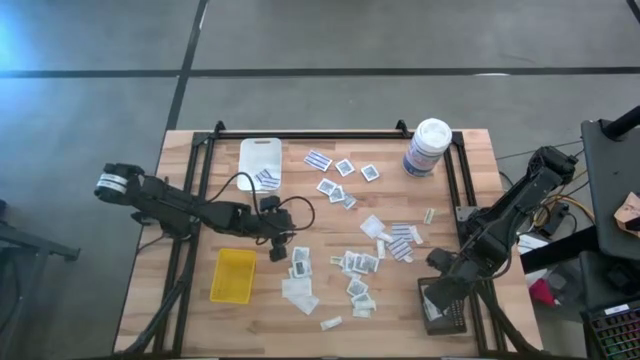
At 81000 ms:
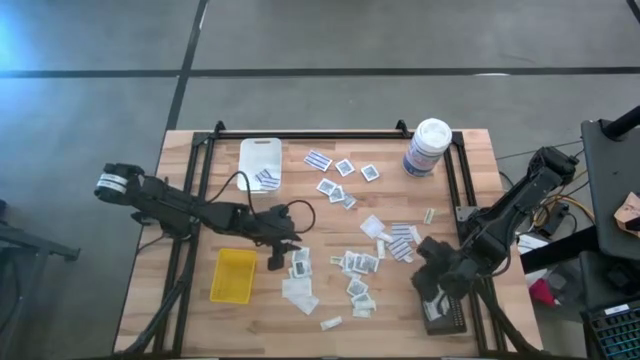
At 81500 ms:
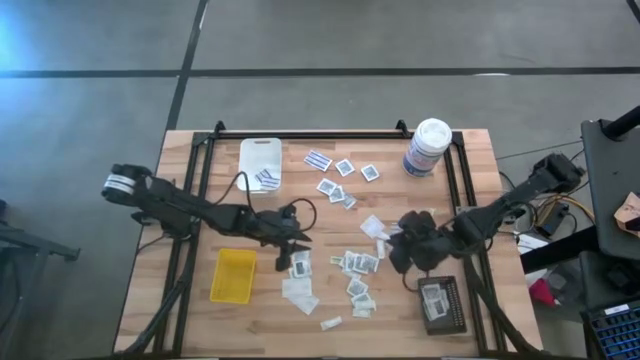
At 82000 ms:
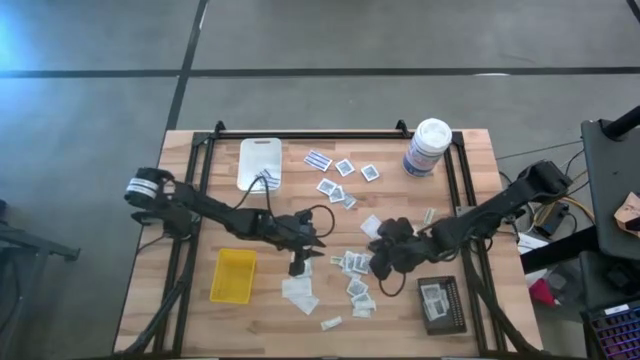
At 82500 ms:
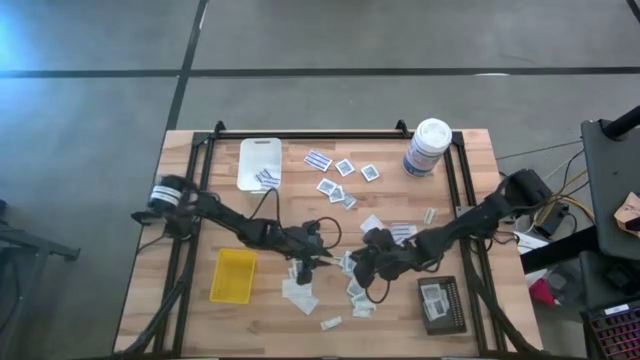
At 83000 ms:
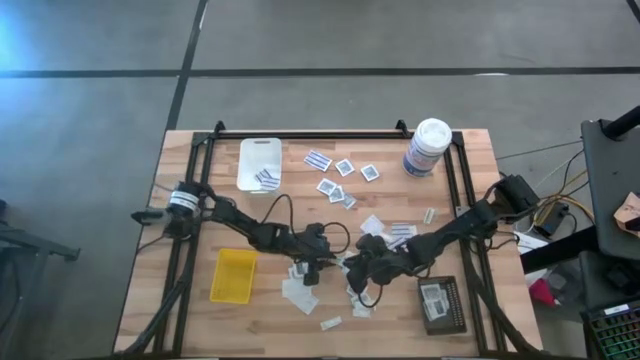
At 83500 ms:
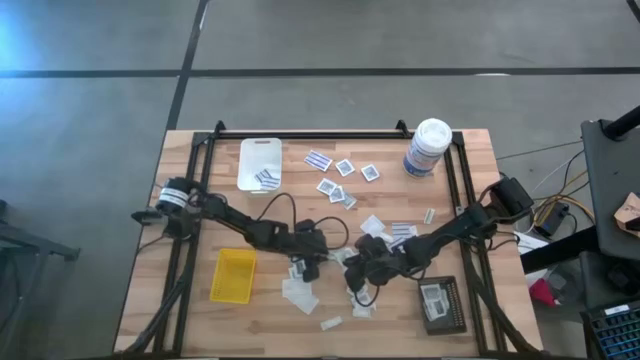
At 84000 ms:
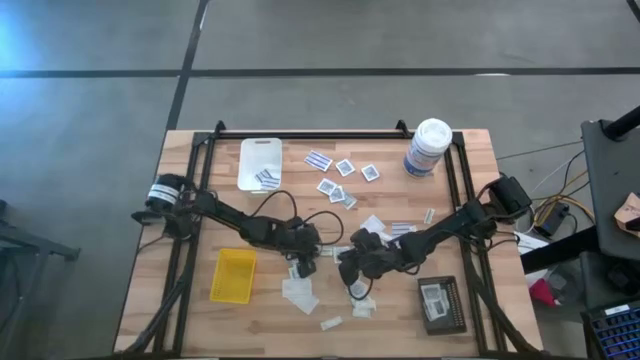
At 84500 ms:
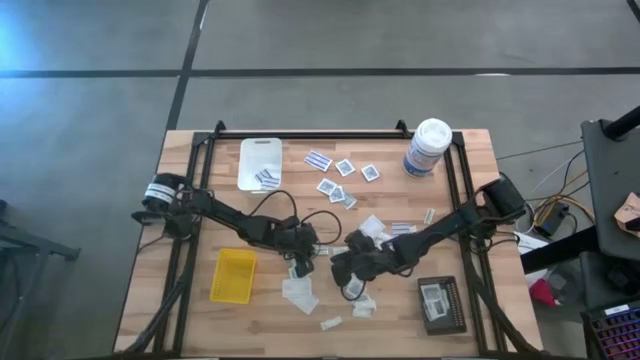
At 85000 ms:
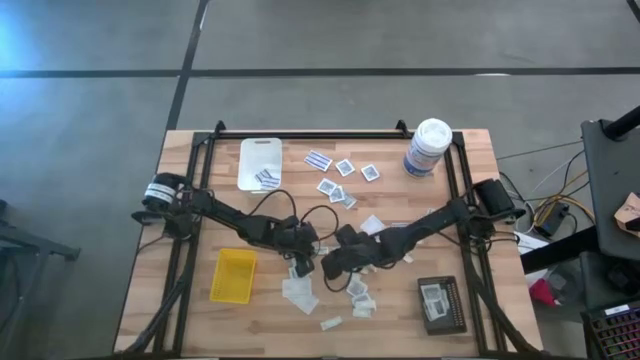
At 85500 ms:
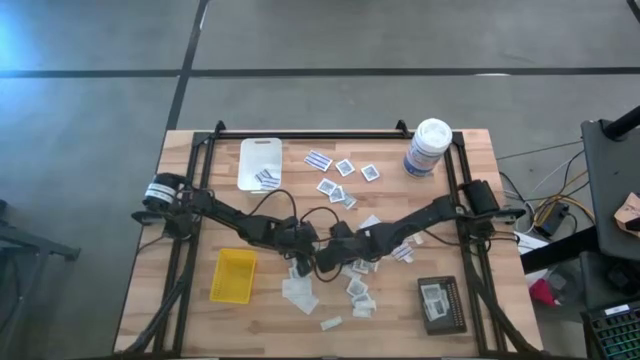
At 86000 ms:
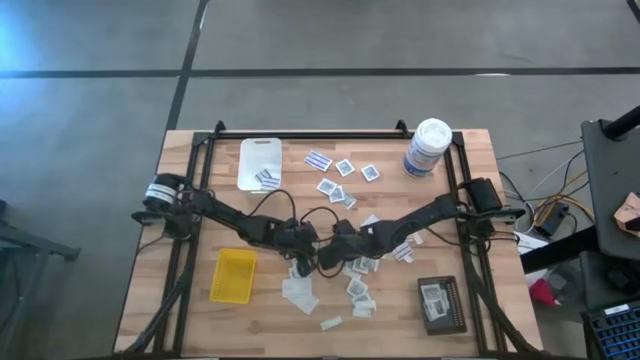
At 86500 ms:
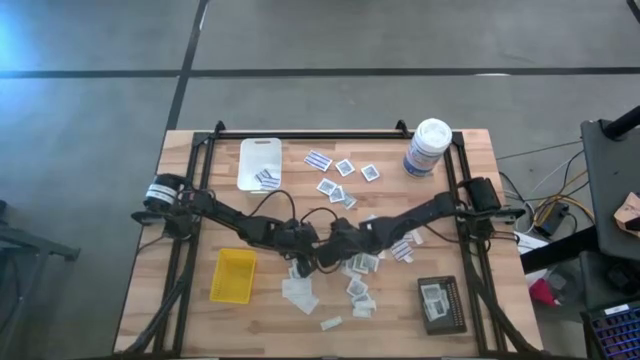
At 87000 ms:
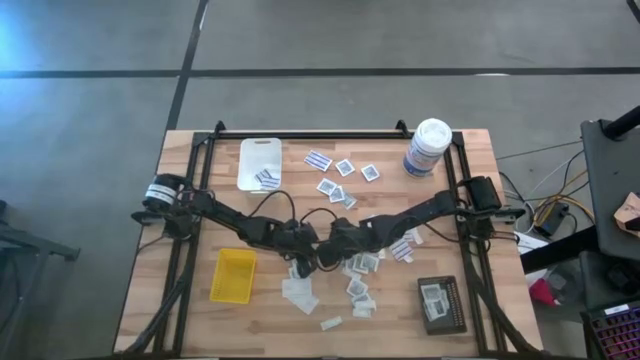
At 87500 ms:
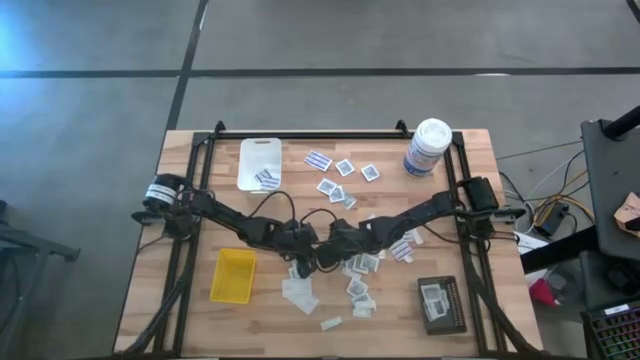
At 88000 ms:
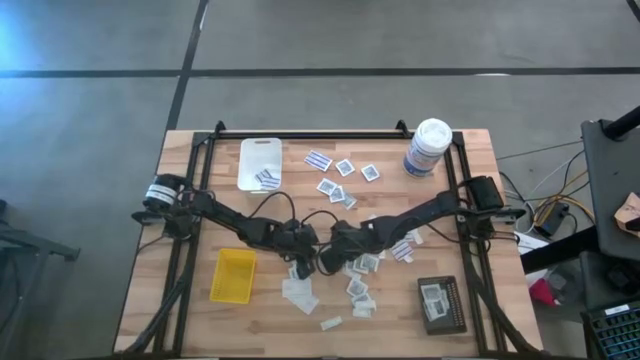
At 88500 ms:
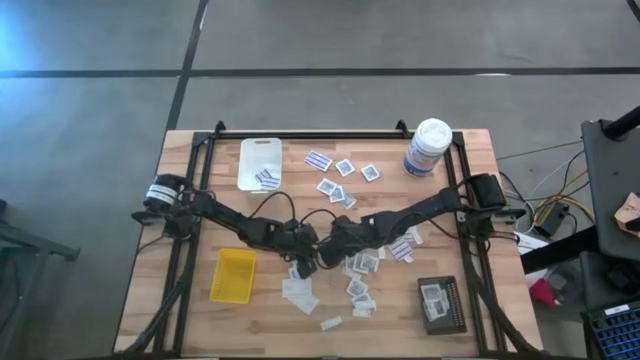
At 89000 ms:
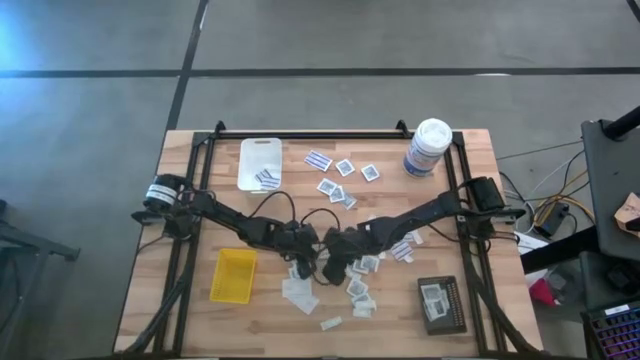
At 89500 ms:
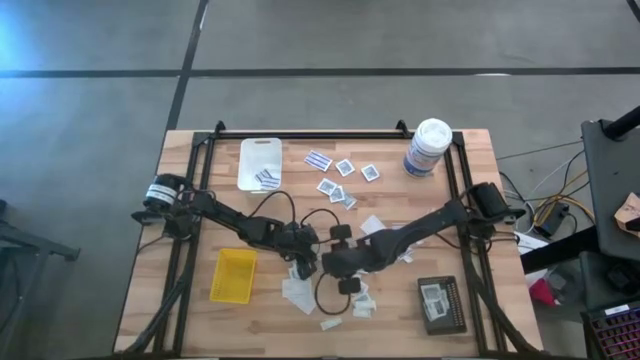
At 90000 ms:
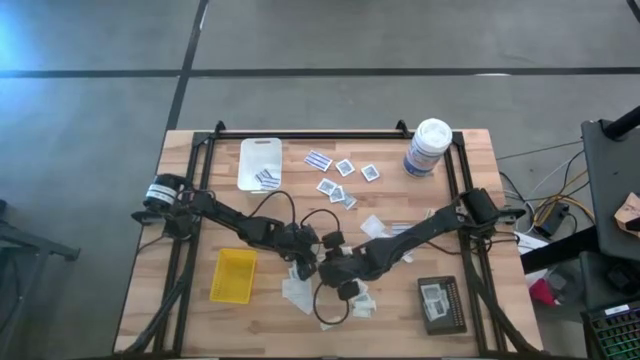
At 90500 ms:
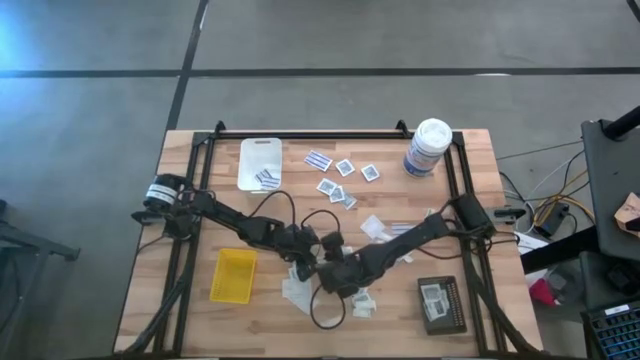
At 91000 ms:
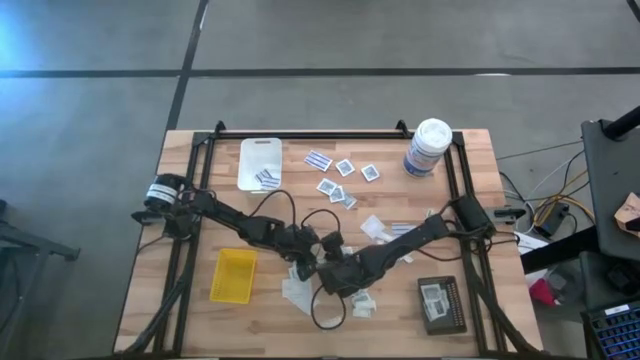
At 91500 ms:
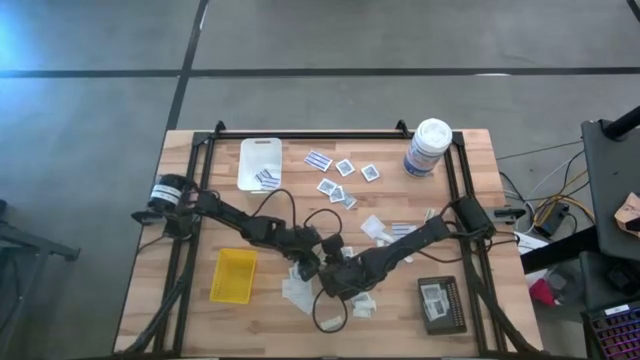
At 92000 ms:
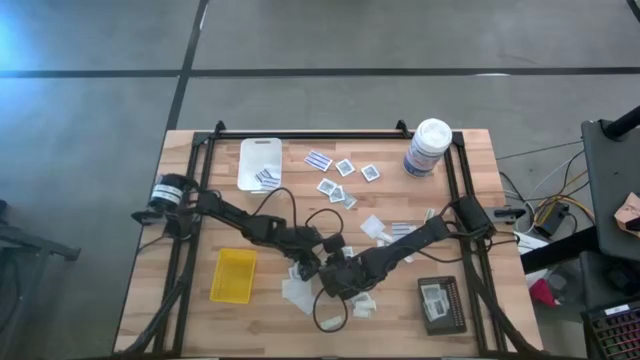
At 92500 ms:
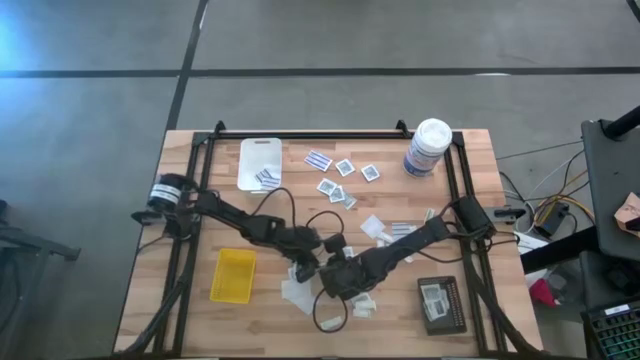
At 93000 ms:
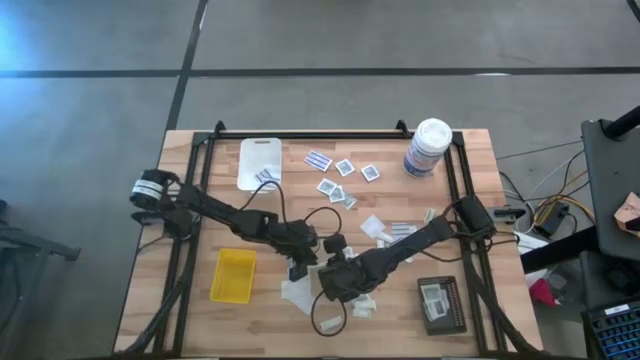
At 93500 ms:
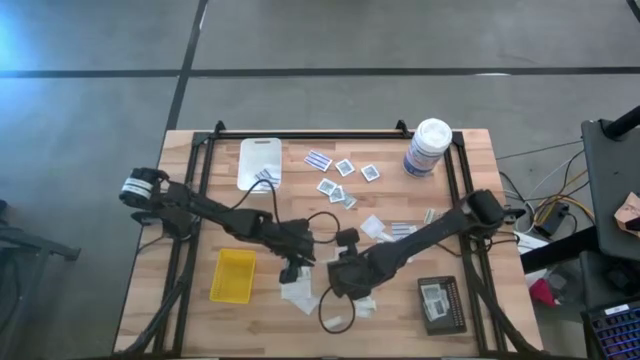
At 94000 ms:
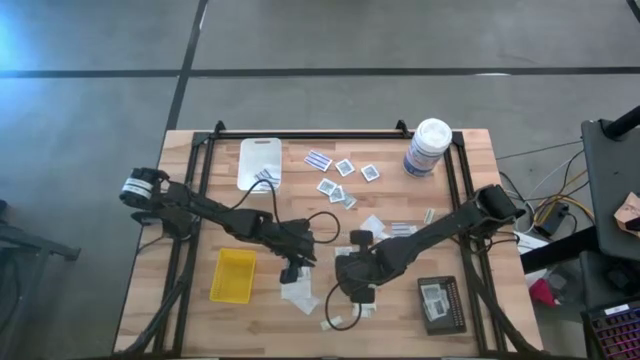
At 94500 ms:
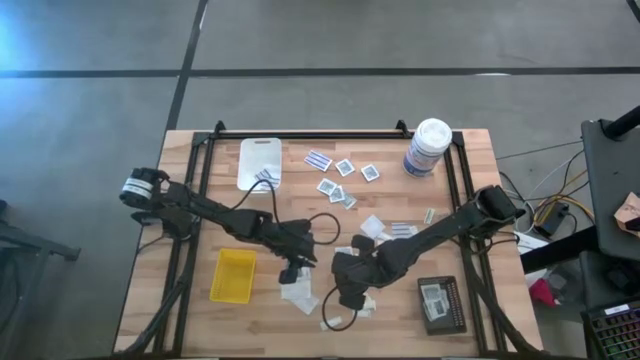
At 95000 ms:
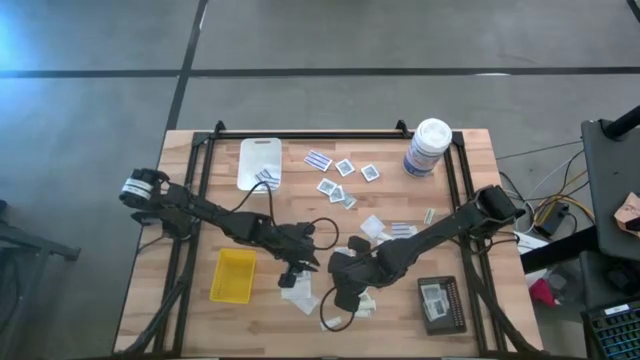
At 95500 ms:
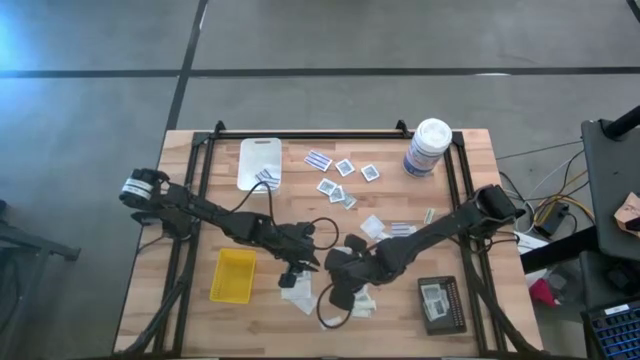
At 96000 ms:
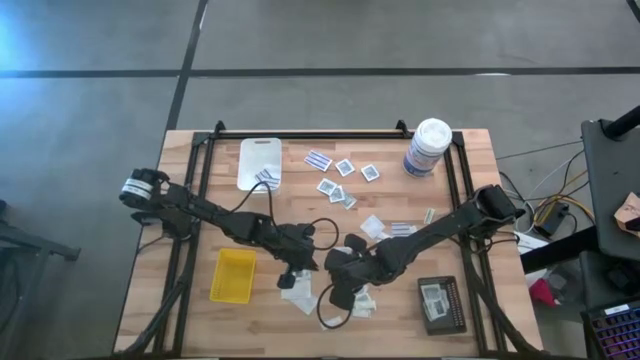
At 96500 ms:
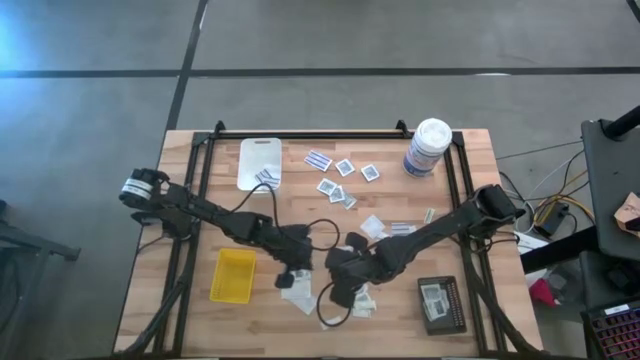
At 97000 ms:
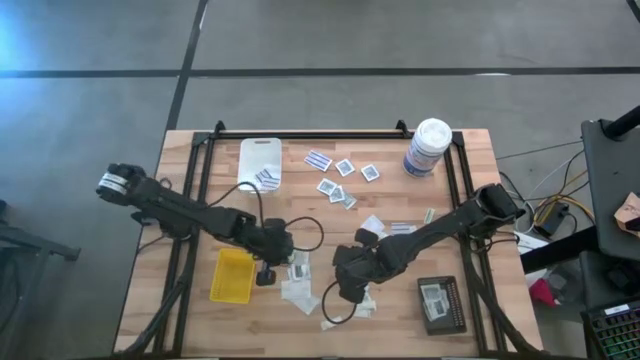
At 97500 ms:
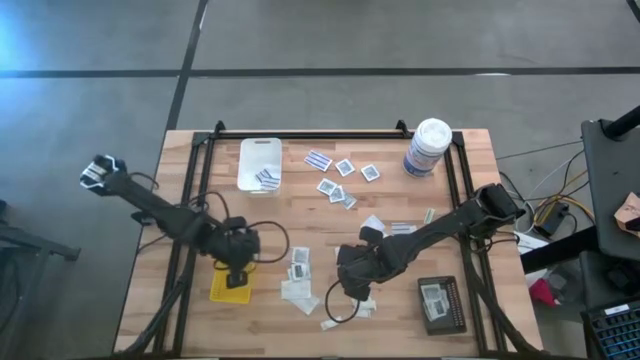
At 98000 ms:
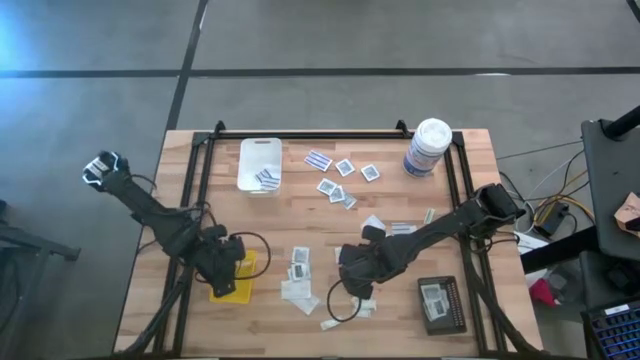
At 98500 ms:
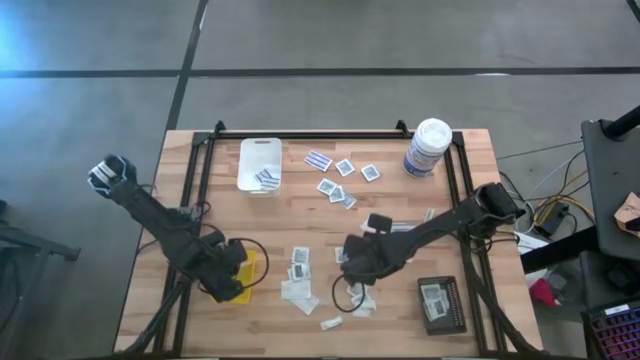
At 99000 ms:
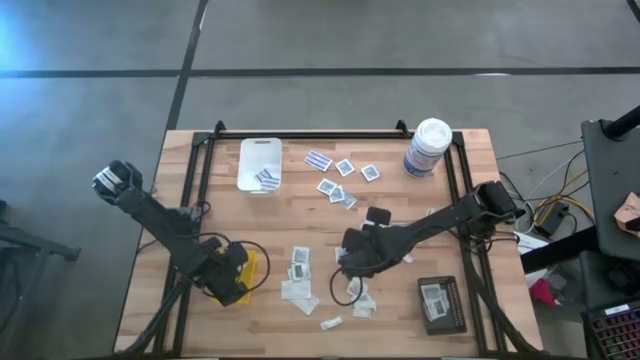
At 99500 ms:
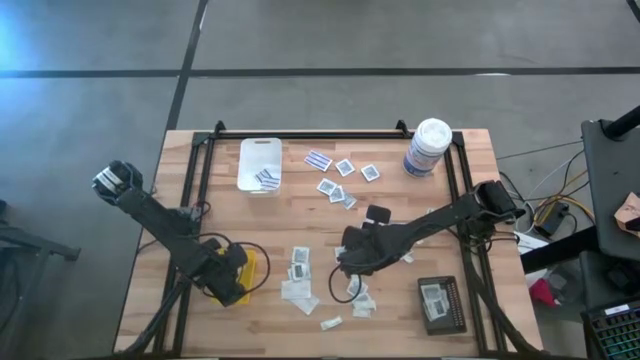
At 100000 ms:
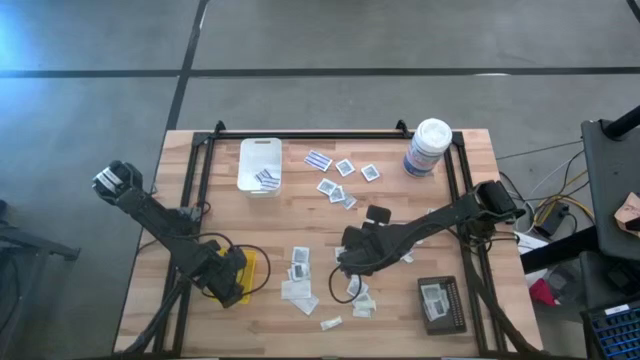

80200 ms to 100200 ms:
Task: Pick & Place First Aid Supplies
Put the green bandage into the yellow bin
